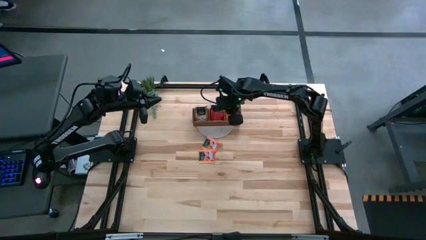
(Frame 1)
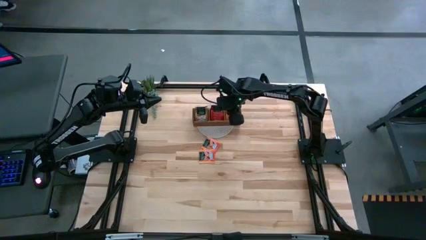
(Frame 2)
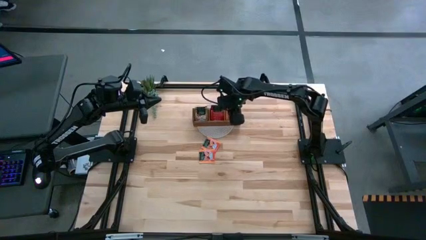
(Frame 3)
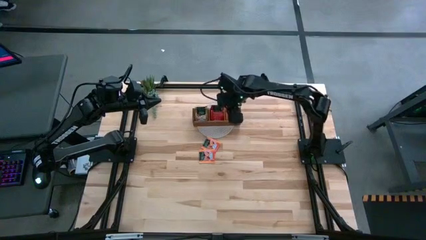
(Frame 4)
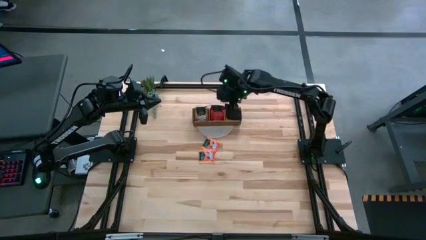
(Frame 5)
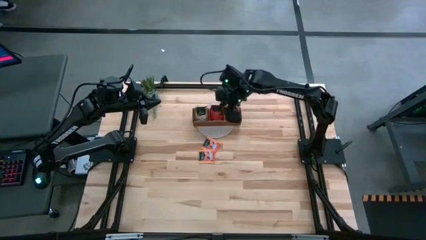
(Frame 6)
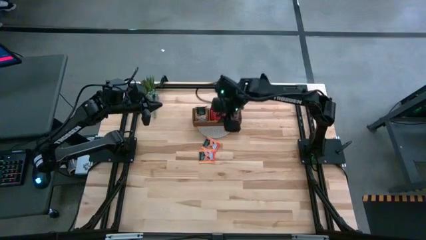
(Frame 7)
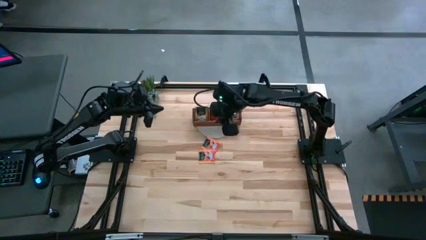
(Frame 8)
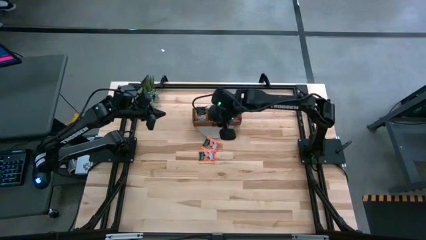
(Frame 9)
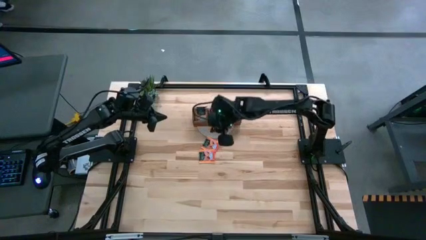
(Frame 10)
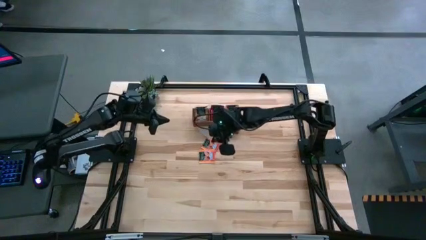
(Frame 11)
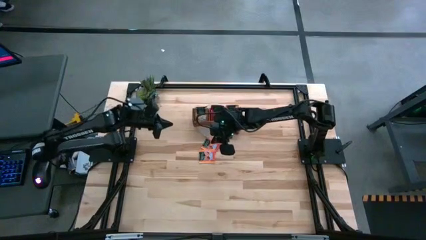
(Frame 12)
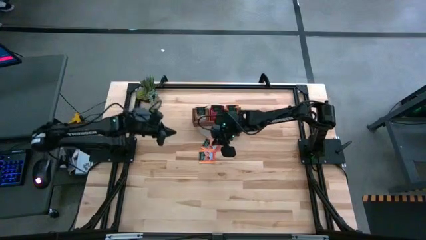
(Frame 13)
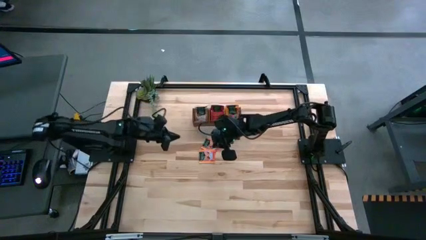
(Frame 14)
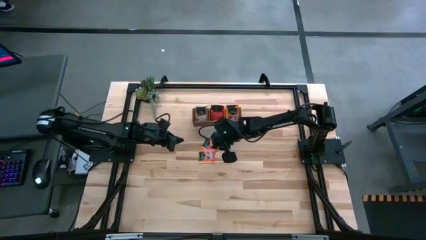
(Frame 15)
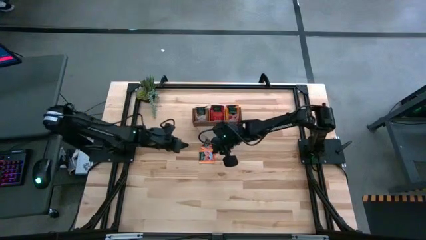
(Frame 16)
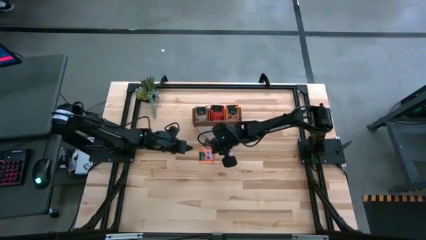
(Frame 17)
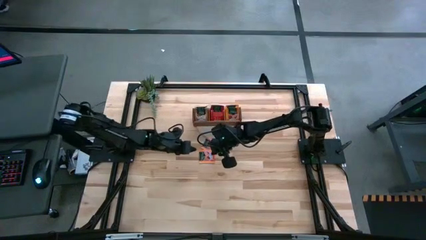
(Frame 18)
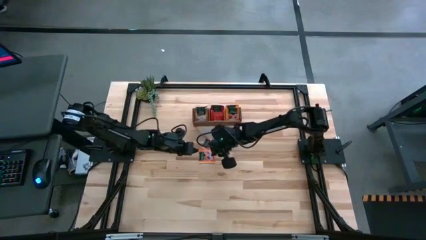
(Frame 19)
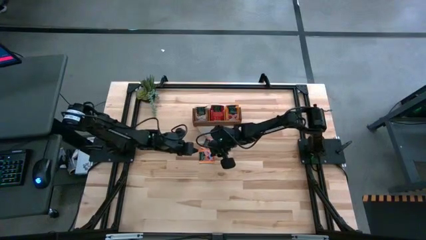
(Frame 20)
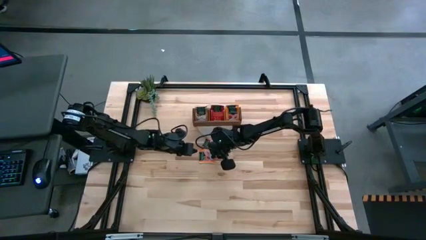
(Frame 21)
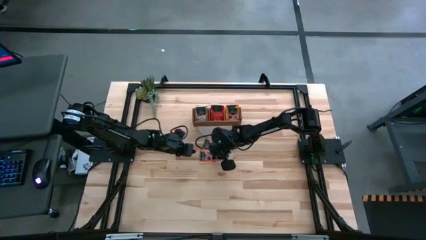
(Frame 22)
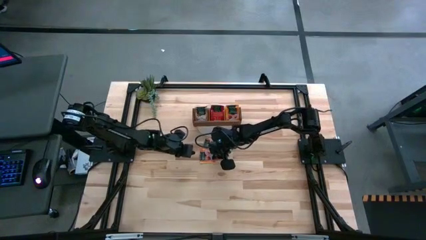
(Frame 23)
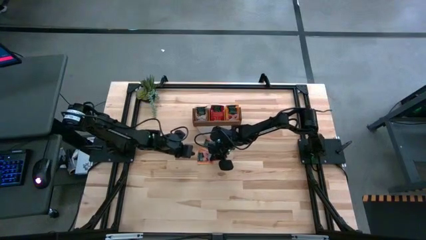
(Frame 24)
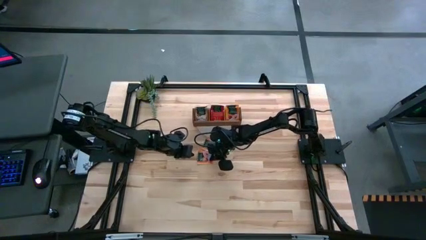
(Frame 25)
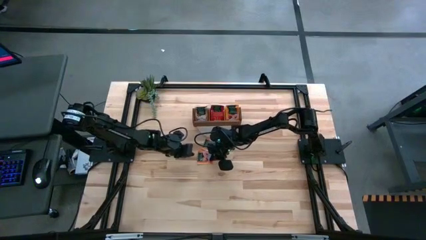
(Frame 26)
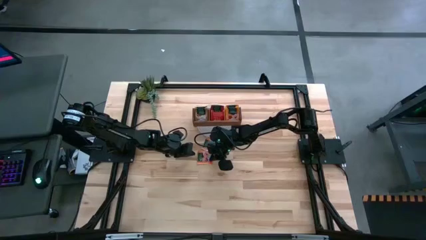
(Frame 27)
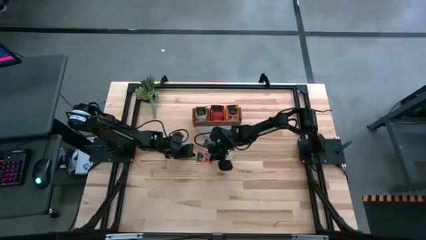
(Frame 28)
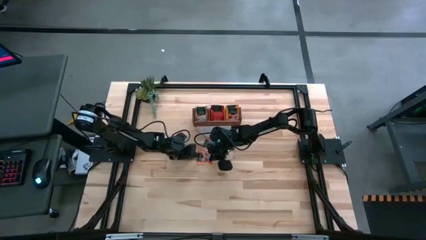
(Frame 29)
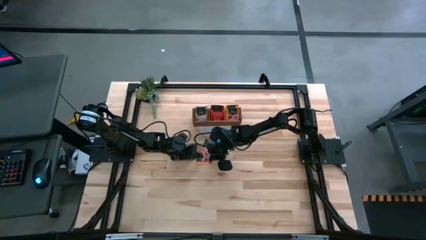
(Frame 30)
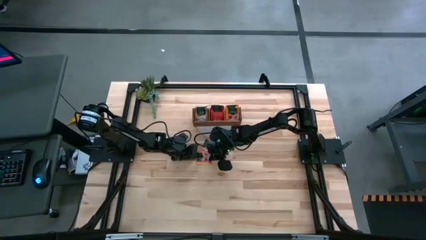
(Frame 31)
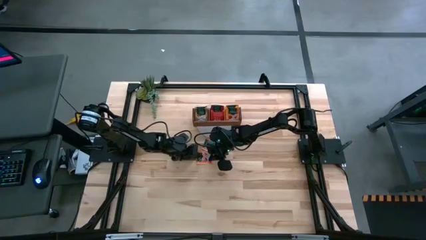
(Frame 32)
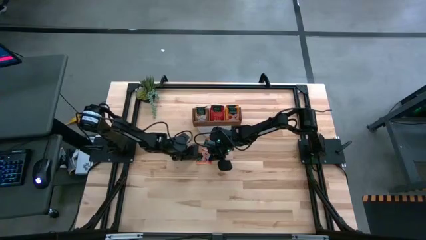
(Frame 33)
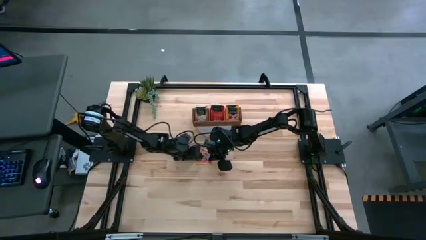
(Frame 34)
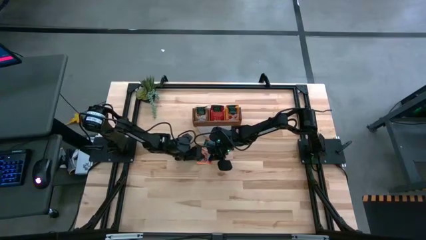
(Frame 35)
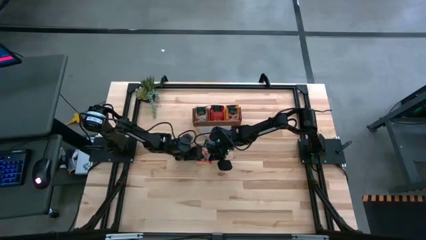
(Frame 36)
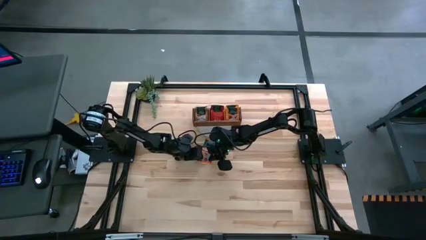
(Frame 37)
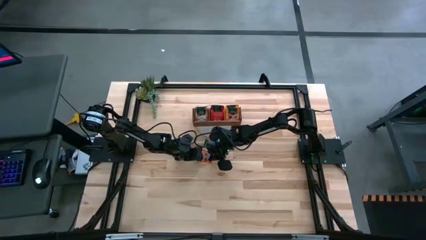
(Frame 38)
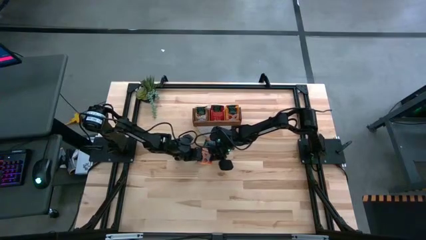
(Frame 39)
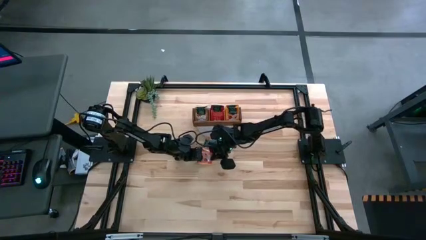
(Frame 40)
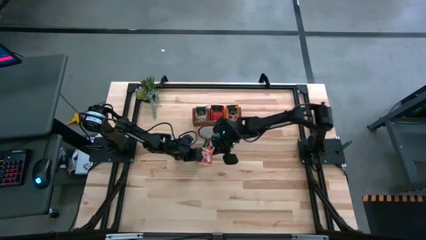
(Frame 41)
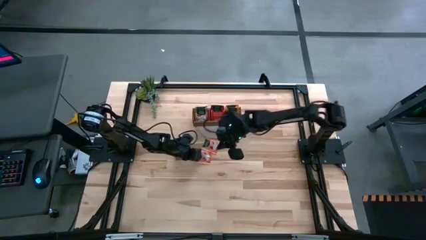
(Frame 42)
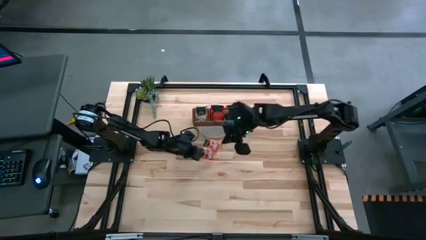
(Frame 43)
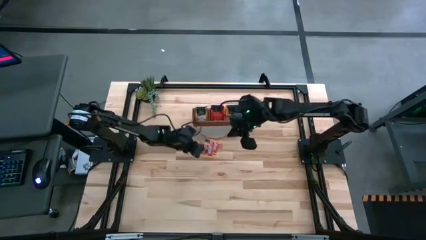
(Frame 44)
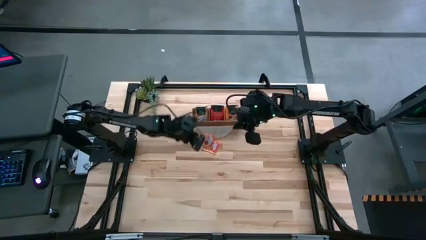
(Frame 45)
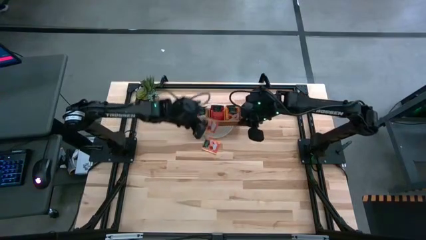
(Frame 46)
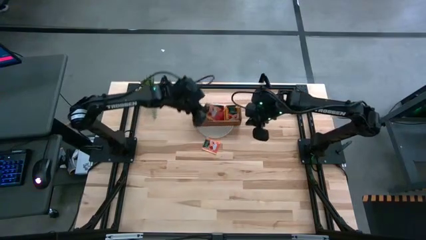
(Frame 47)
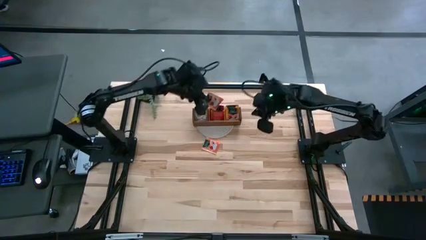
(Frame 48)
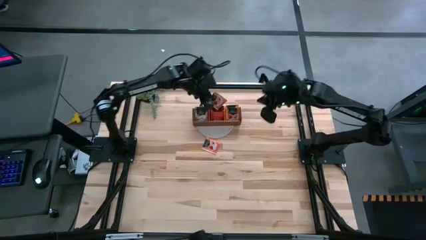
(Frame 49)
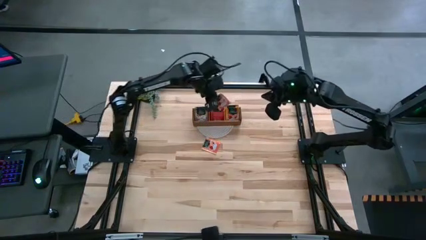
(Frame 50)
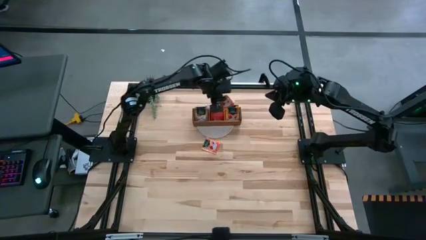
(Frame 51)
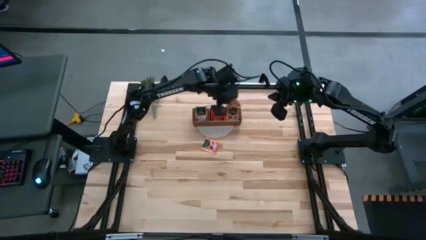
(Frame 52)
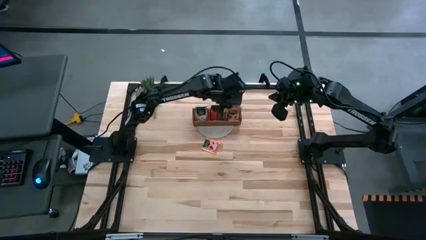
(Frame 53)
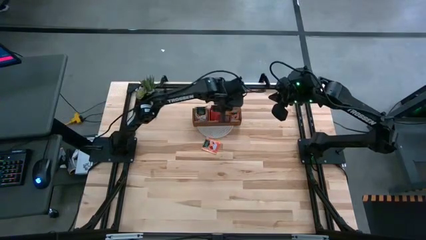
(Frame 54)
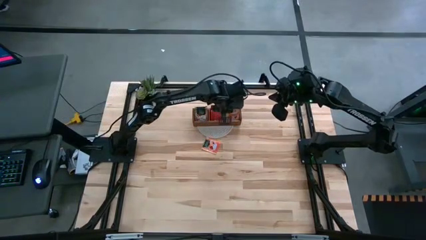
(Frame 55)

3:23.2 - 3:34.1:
Task: Pick & Place Tea
Put the orange tea bag in the right section of the wooden organizer

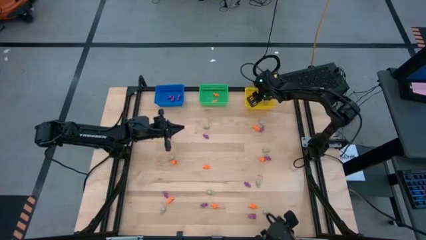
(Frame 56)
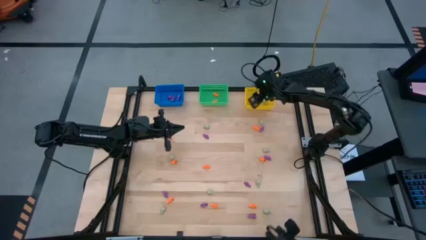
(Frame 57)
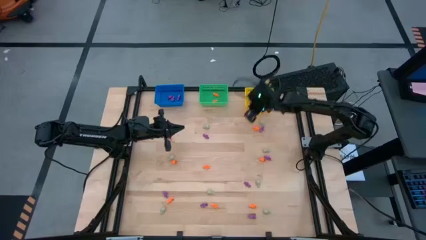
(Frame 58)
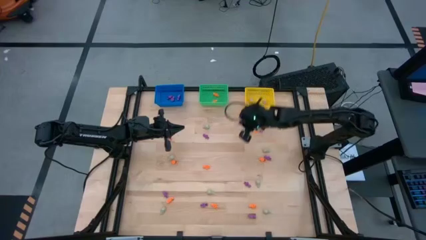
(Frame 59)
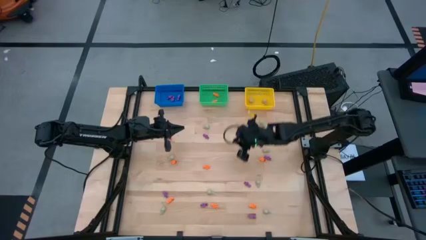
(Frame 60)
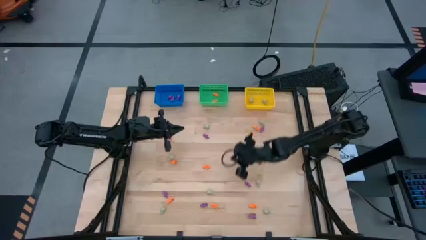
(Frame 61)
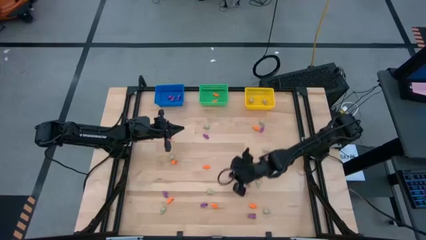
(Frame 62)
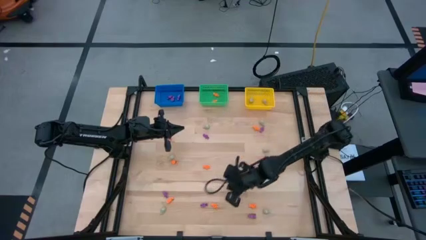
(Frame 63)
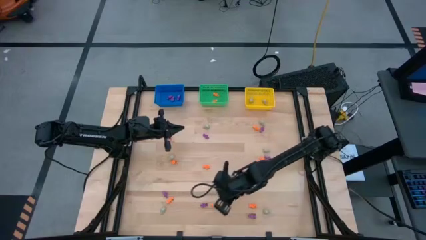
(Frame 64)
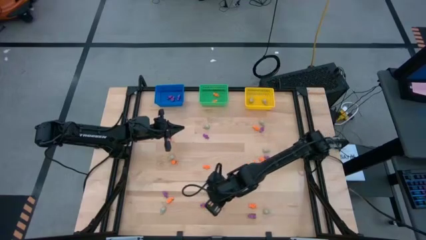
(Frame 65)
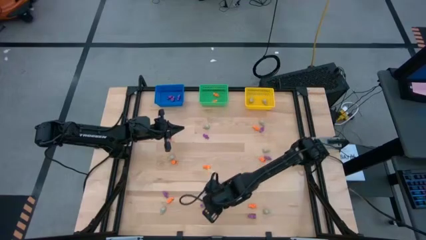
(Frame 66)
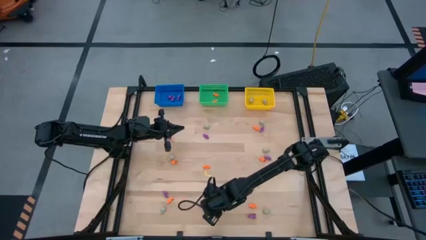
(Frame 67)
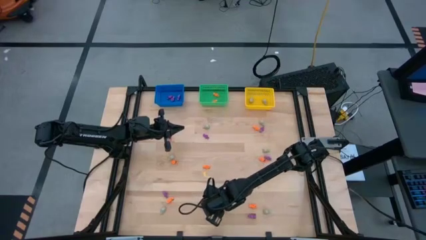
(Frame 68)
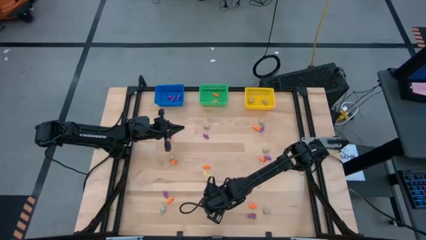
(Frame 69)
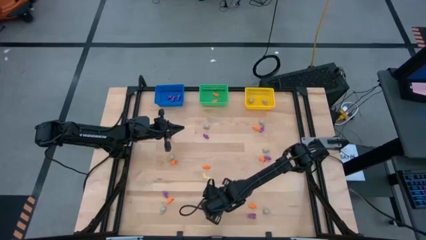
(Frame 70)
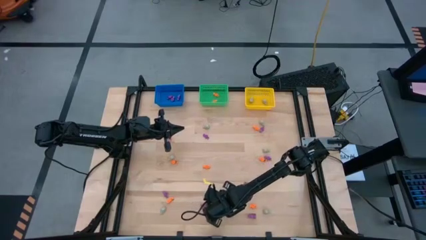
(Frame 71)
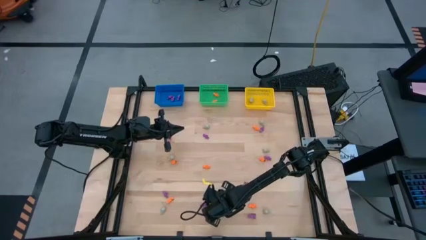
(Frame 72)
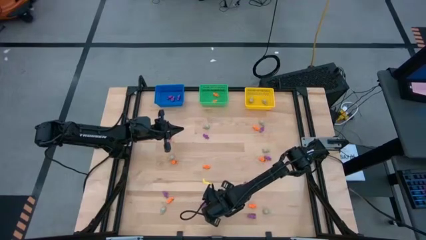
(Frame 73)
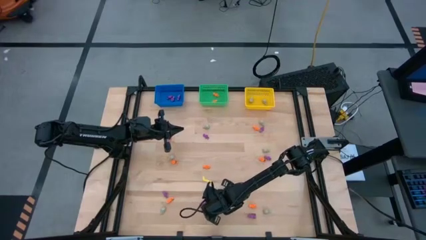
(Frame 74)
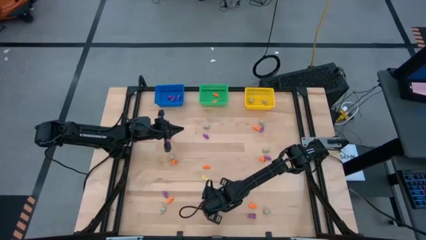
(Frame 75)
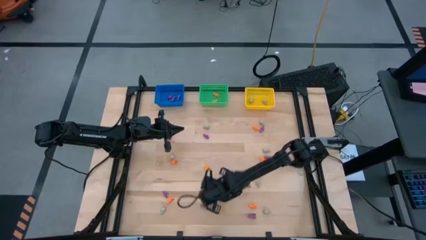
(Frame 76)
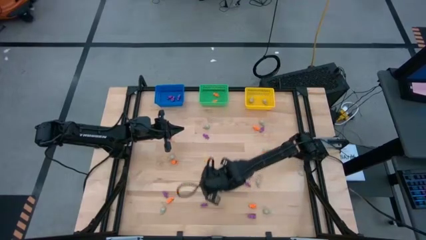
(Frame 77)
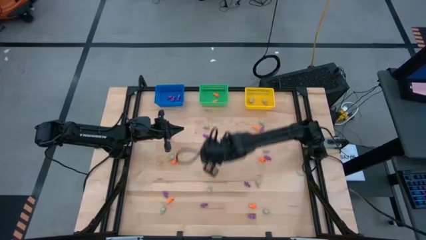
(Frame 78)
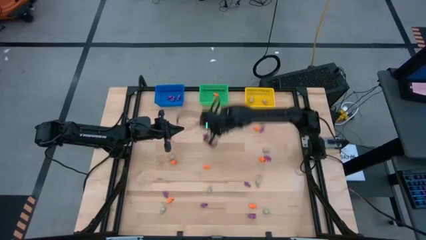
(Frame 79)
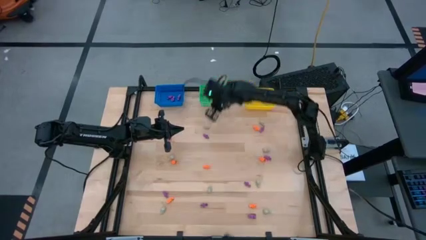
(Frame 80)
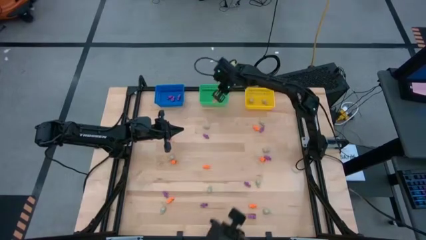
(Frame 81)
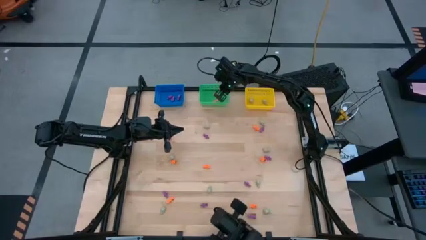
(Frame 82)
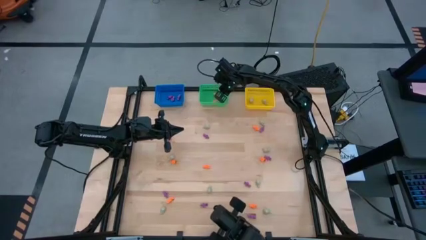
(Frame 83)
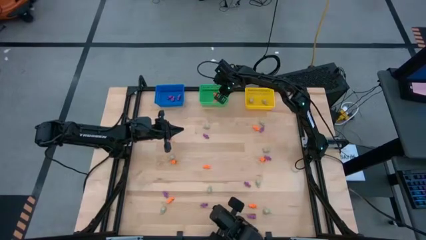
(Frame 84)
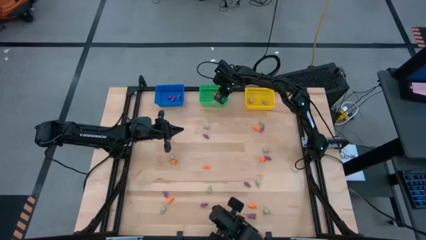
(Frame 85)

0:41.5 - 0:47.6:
Task: Sort Halloween decoration
Put the orange skeleton toy into the green basket
